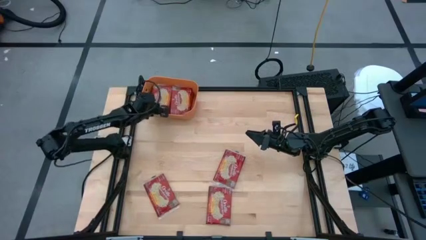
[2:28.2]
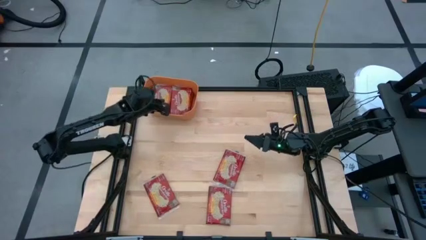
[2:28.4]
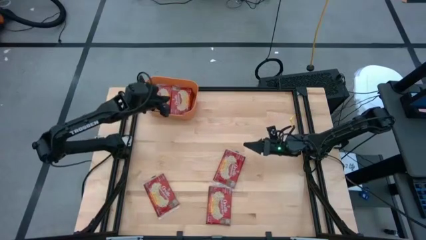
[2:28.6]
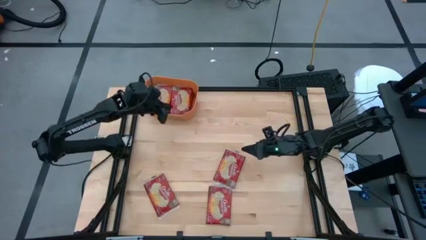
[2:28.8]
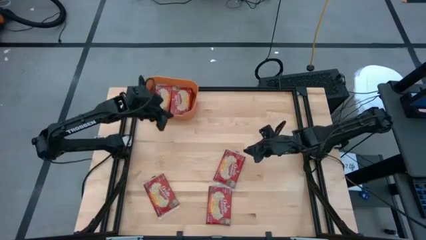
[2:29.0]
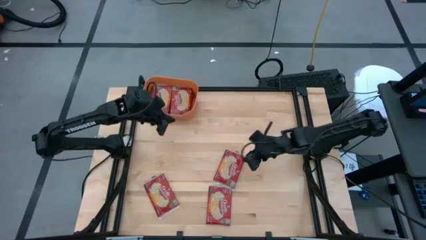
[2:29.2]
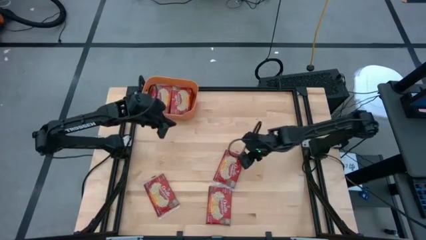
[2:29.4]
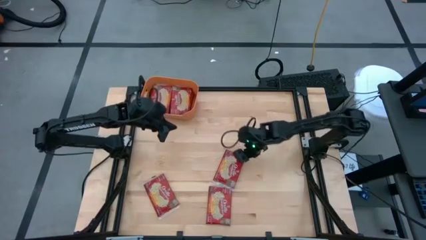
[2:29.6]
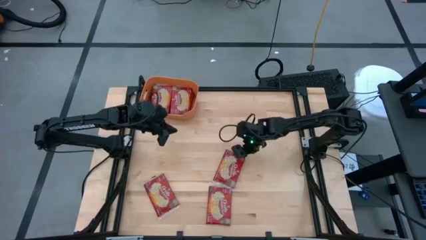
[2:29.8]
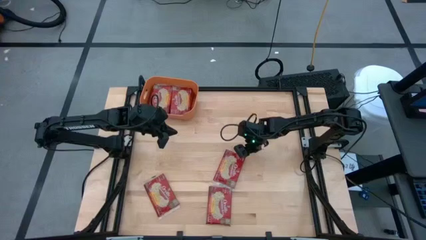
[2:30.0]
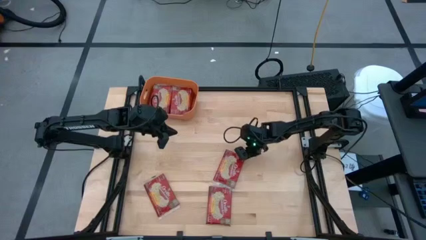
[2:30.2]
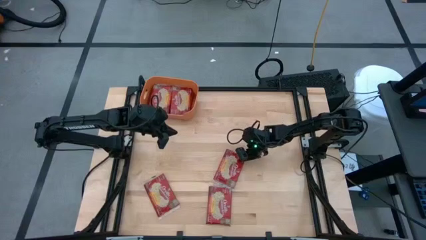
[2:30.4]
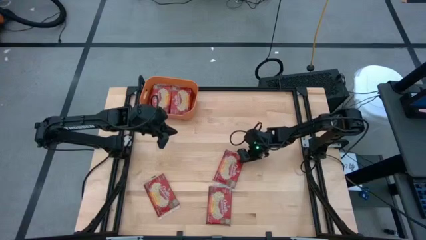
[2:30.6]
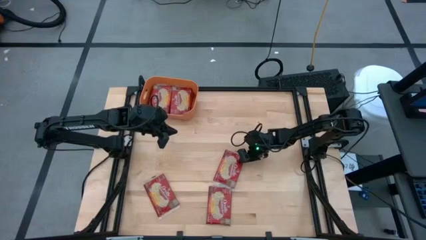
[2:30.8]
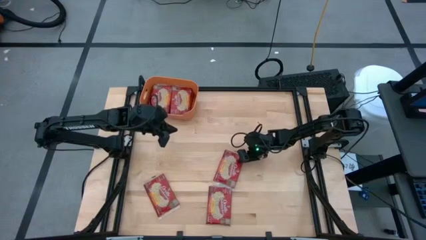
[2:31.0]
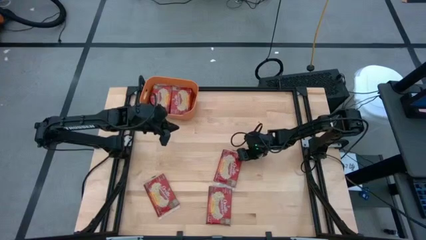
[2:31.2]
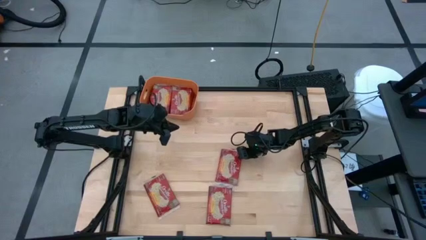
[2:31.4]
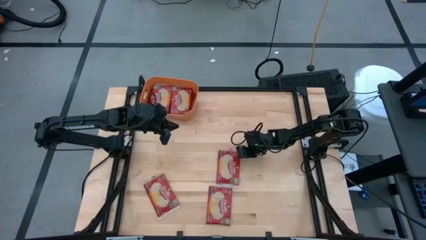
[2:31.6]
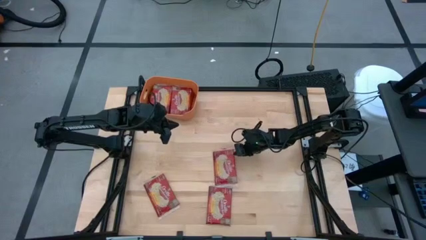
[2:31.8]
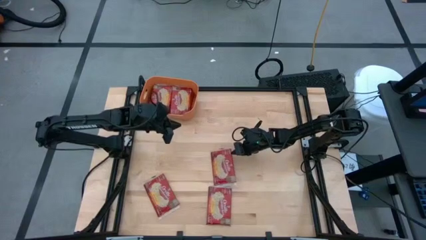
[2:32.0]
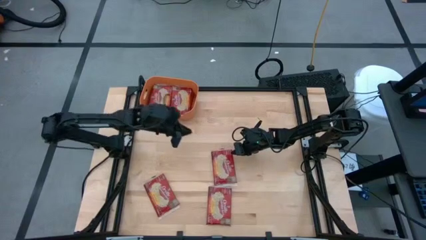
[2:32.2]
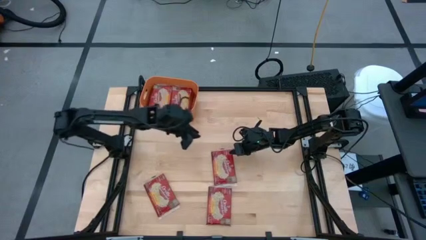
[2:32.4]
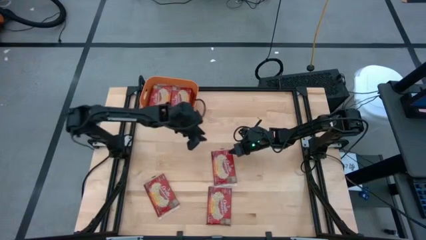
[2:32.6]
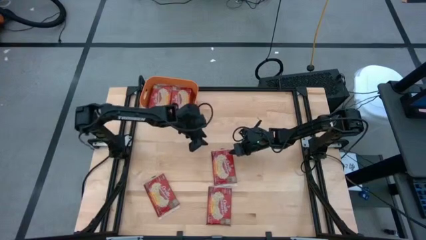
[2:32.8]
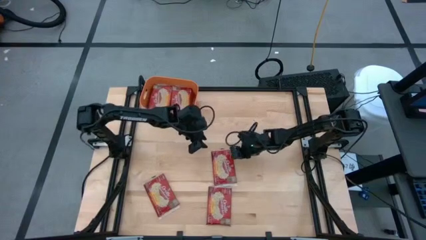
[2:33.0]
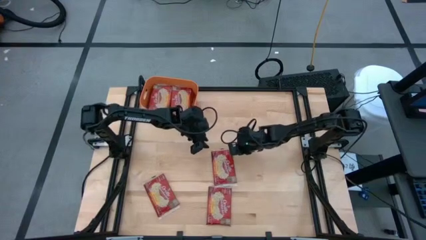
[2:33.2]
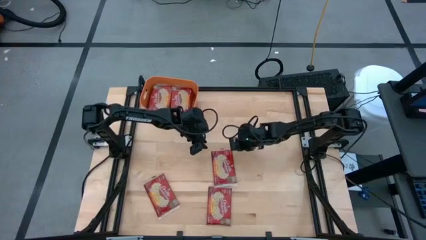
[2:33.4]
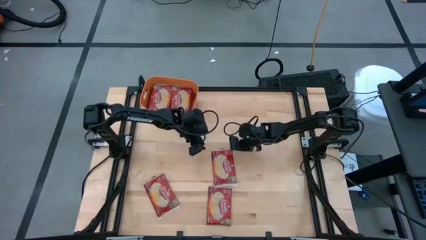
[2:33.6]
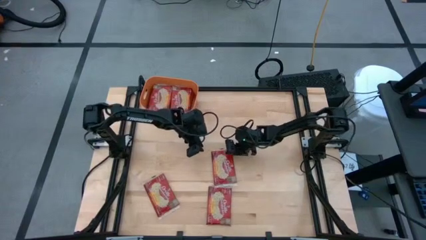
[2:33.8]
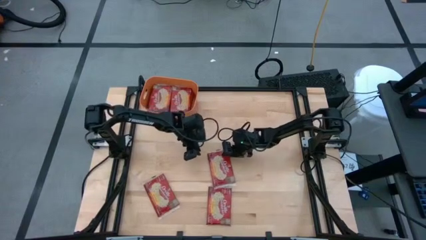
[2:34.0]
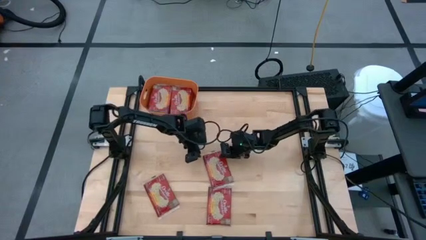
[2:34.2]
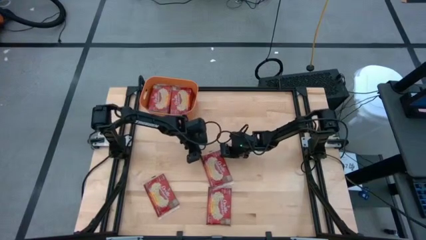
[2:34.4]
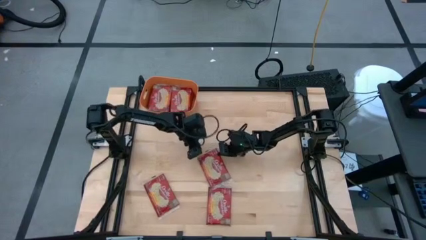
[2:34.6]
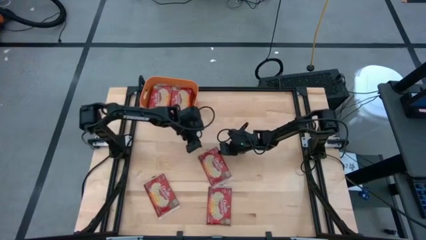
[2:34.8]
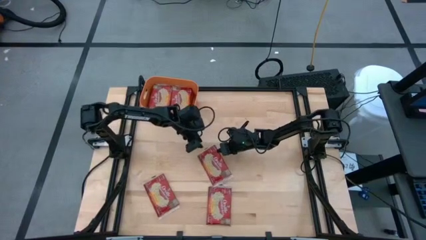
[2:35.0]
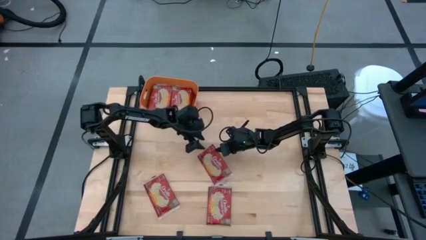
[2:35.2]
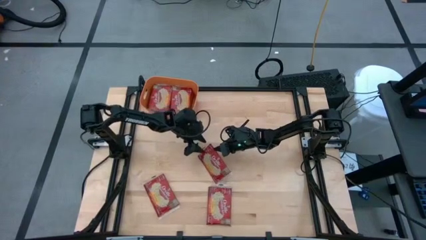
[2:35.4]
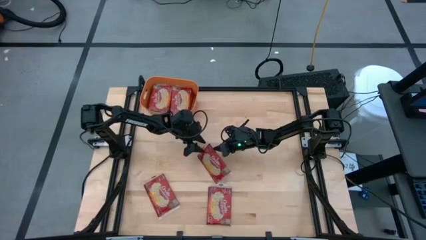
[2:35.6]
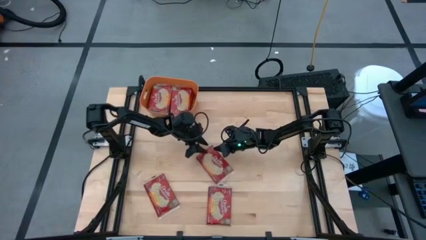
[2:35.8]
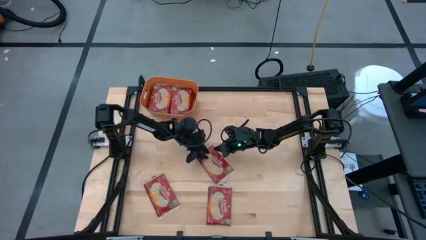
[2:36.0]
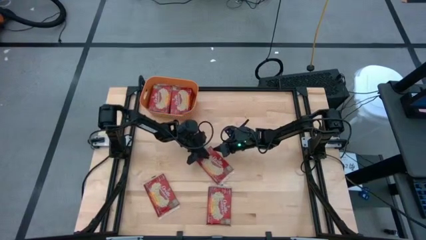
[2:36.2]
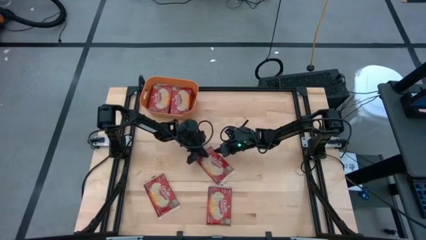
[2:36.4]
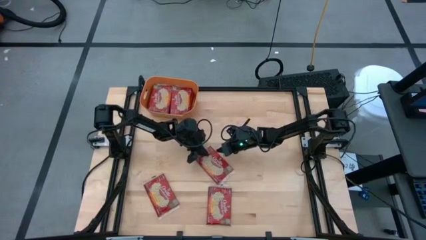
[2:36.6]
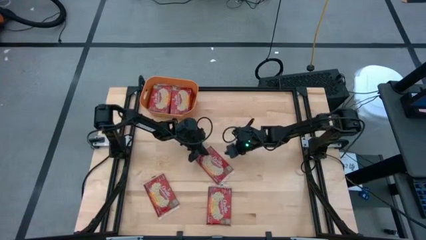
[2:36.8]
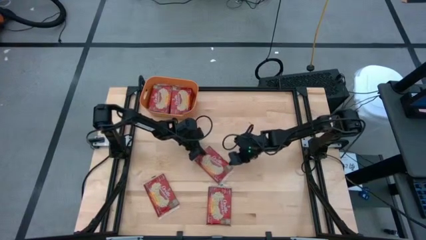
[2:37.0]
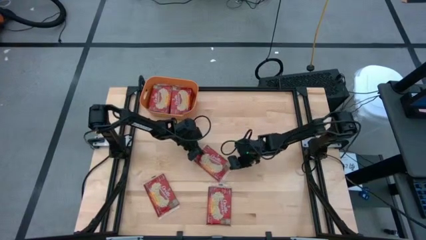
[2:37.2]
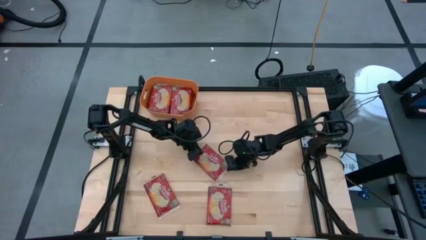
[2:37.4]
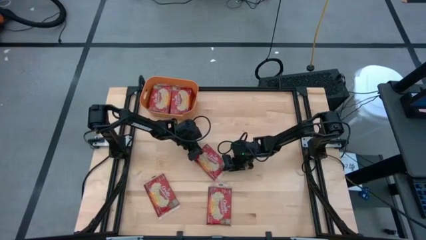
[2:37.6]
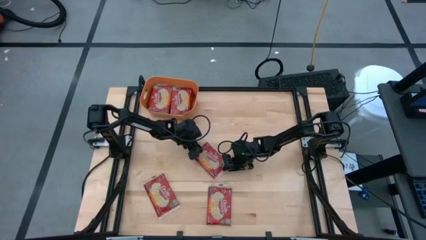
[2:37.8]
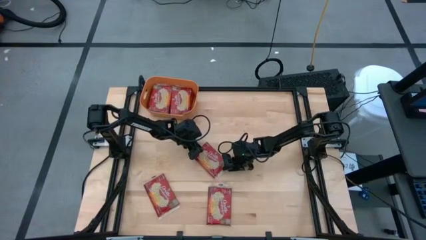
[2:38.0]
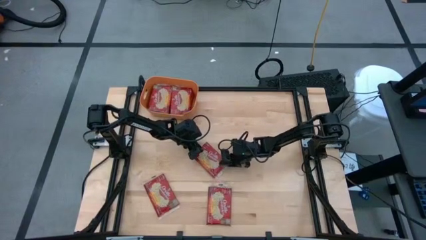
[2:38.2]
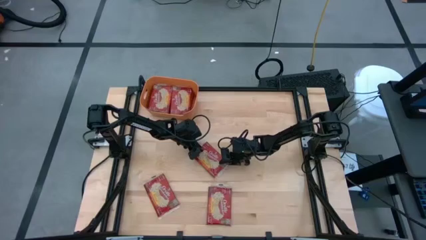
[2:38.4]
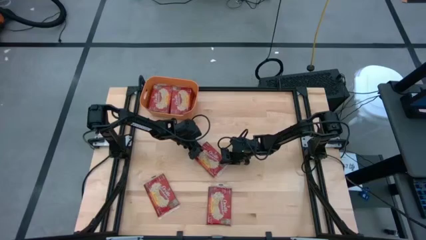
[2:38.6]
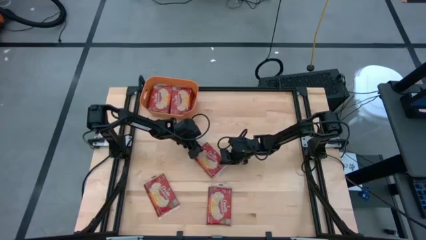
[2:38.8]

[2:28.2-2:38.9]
Task: Sort popcorn bags into baskets
Stack the red popcorn bag on top of the red popcorn bag in the orange bin
